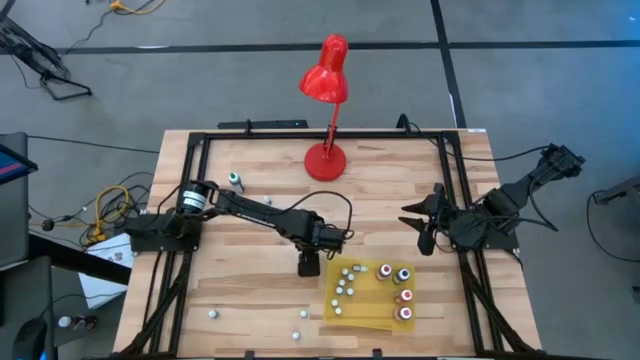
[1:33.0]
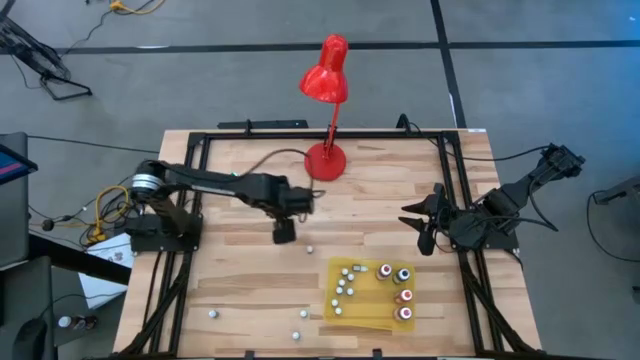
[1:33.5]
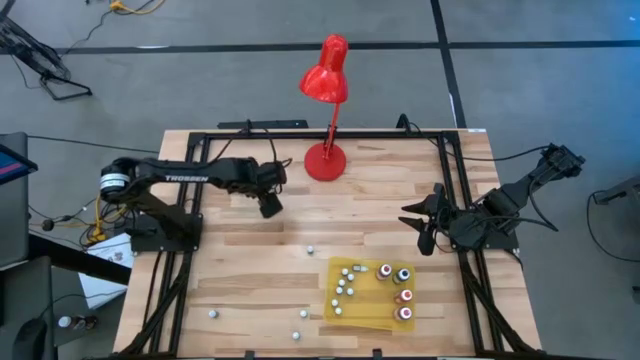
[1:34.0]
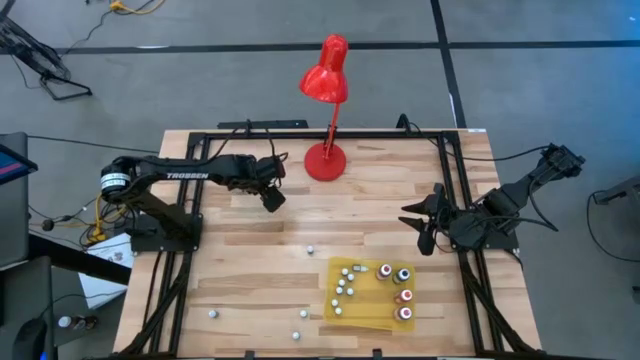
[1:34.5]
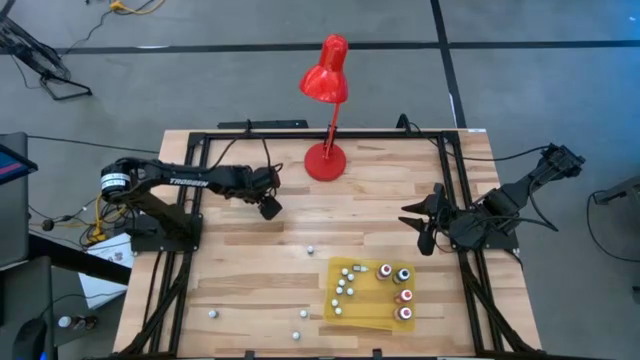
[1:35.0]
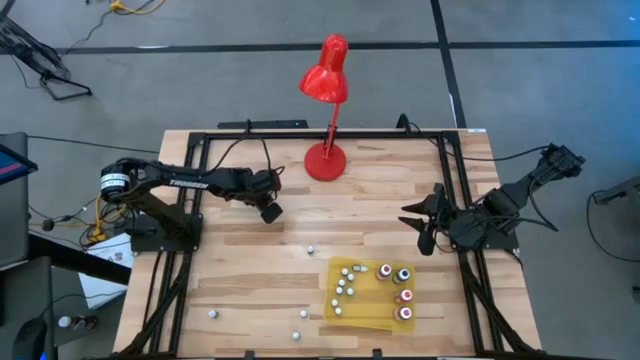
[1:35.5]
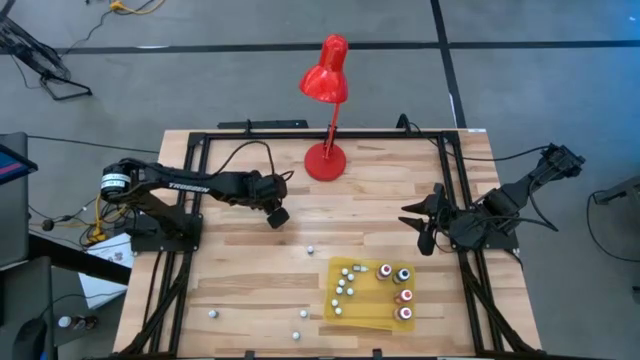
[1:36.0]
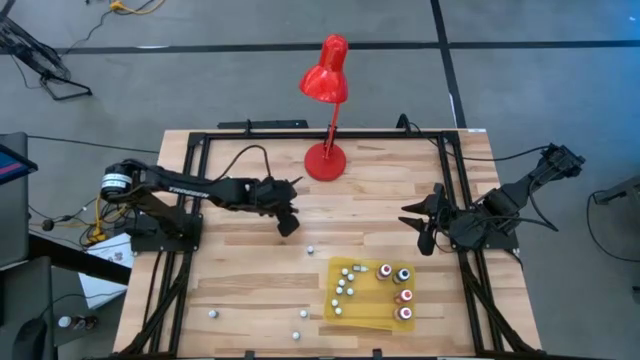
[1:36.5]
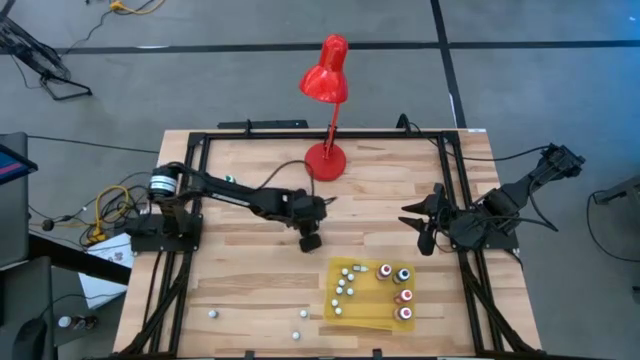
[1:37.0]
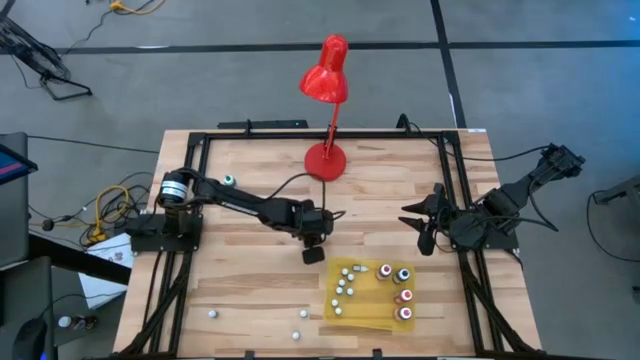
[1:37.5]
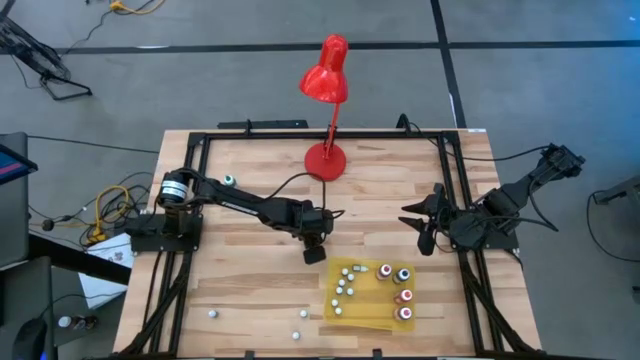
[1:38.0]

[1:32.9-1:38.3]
Task: Pick & Place food coloring
Move the blue food coloring to the center of the table

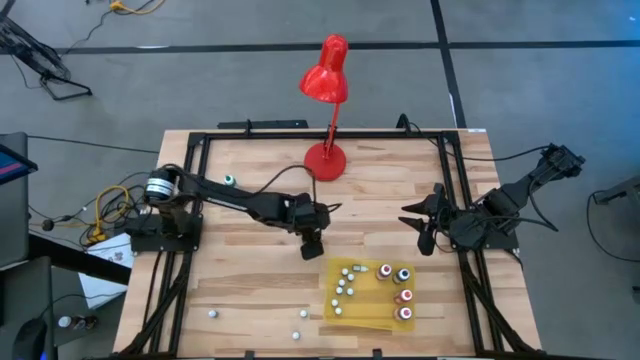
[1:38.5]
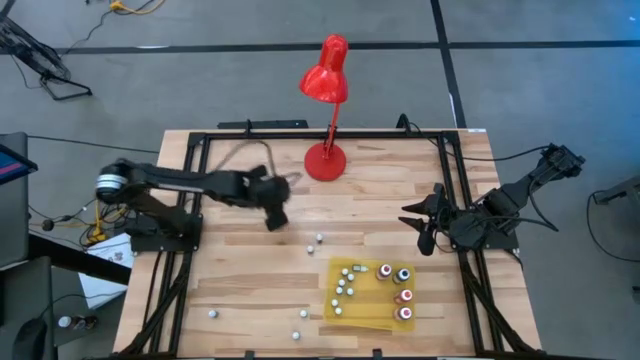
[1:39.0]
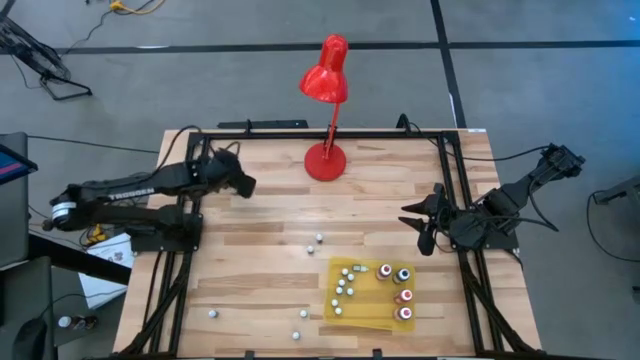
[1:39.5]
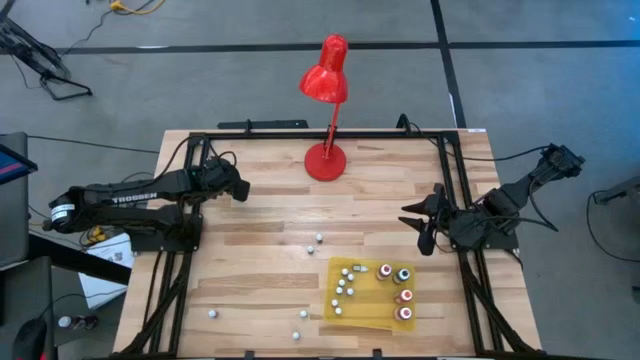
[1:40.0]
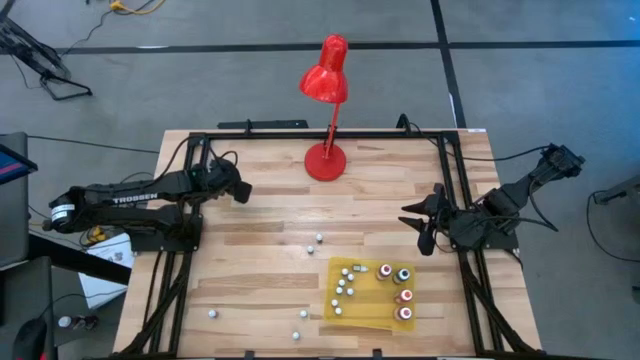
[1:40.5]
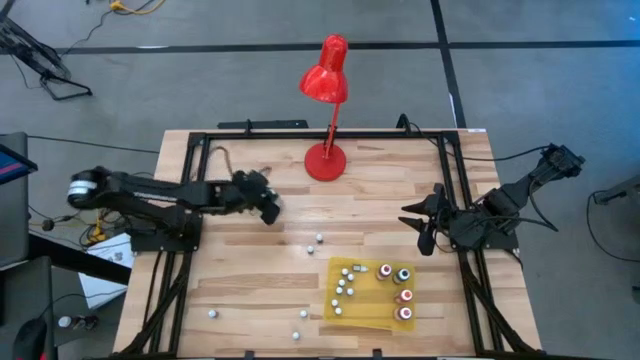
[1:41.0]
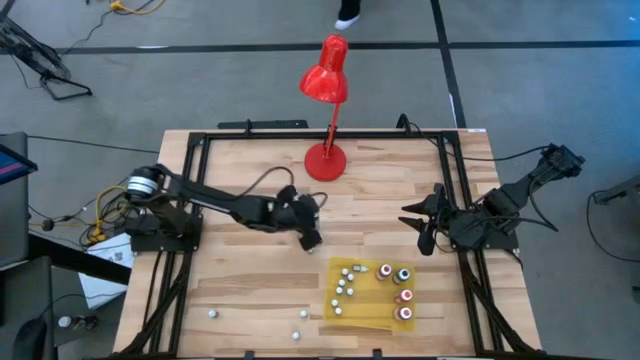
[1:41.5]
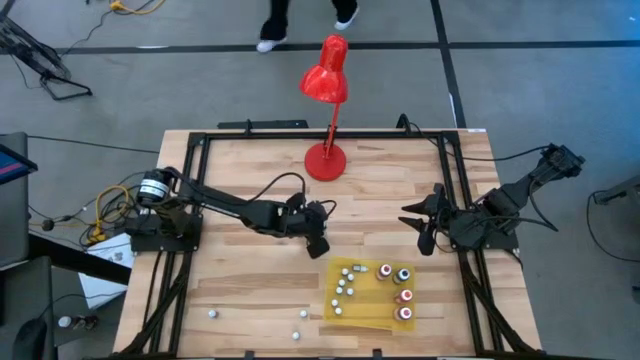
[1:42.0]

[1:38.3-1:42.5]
Move the large green food coloring to the center of the table

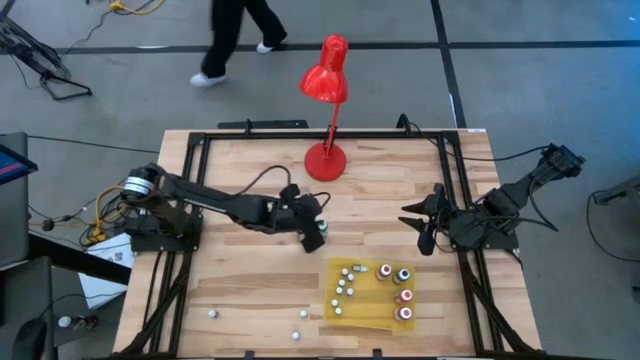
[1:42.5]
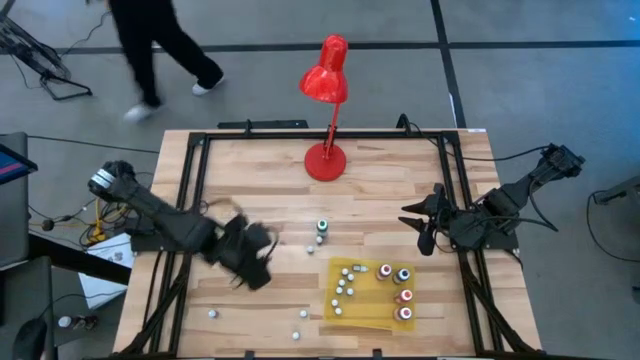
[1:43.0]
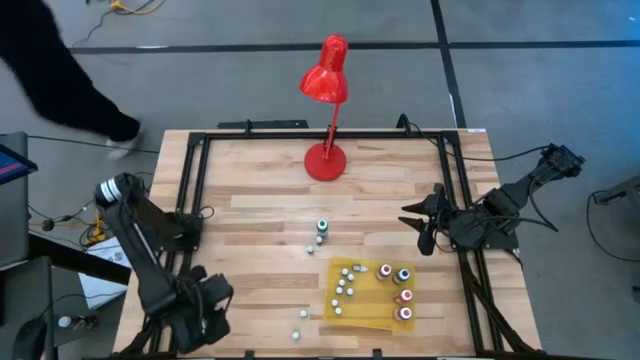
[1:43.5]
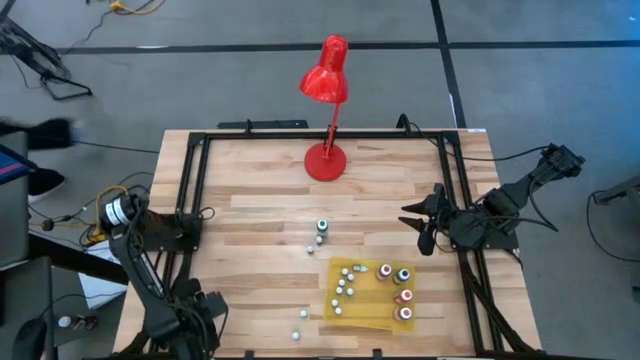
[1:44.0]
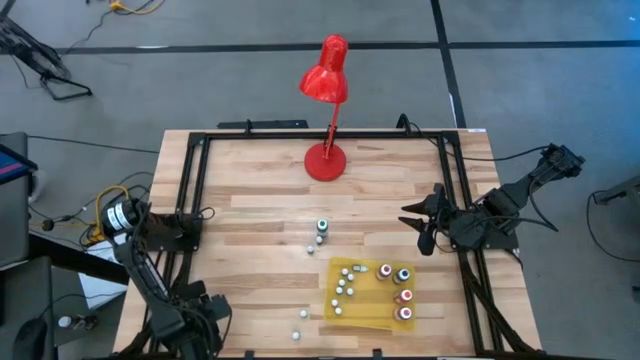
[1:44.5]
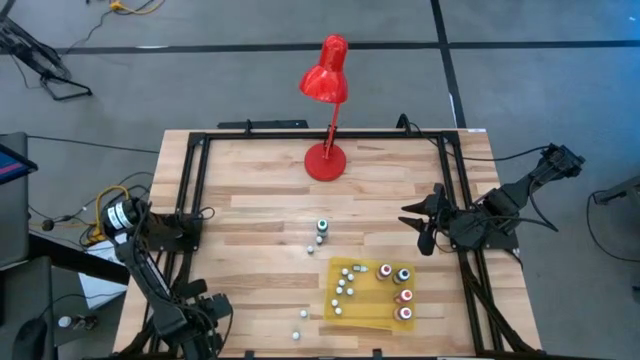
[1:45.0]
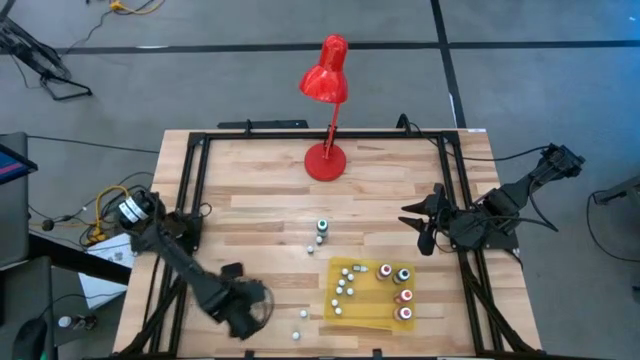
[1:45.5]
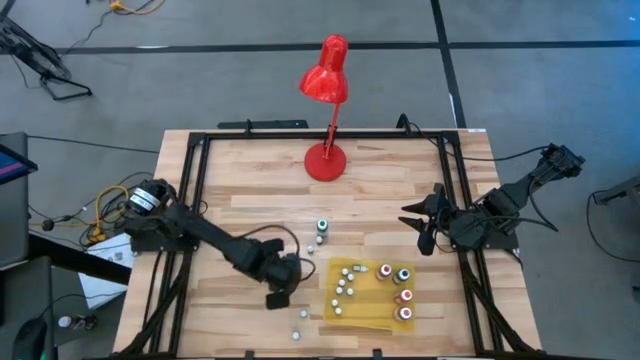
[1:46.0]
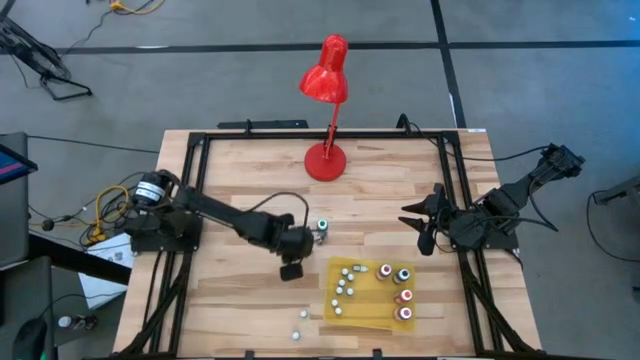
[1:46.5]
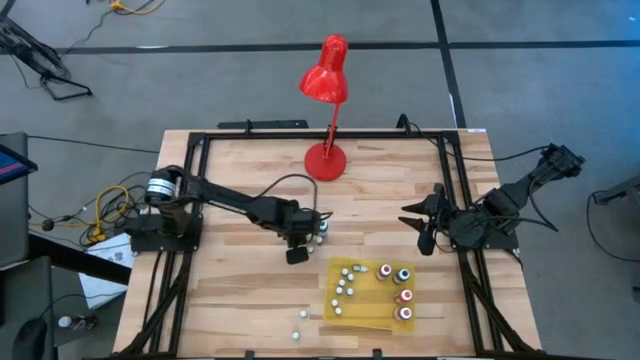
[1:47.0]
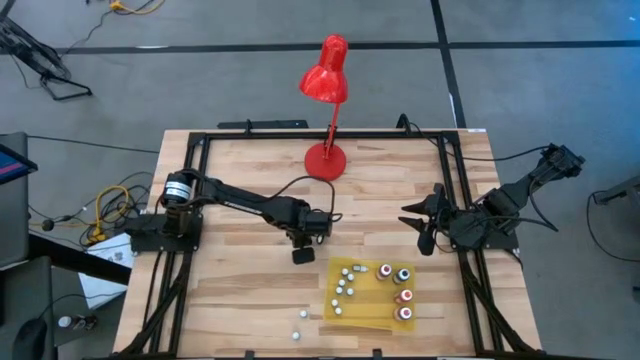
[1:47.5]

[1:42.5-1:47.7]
Move the green food coloring to the center of the table

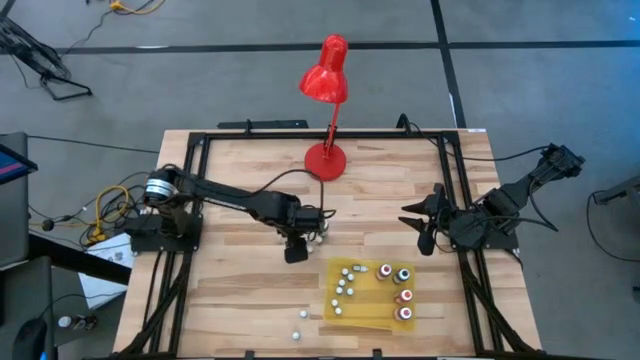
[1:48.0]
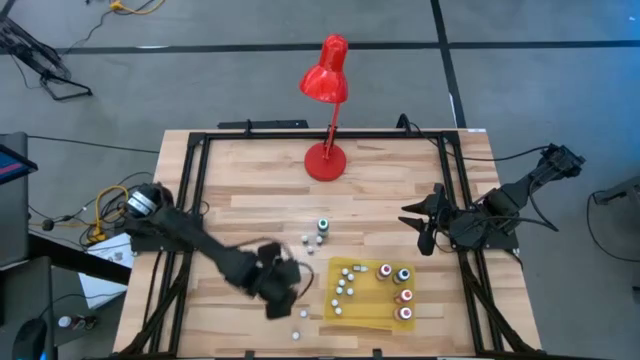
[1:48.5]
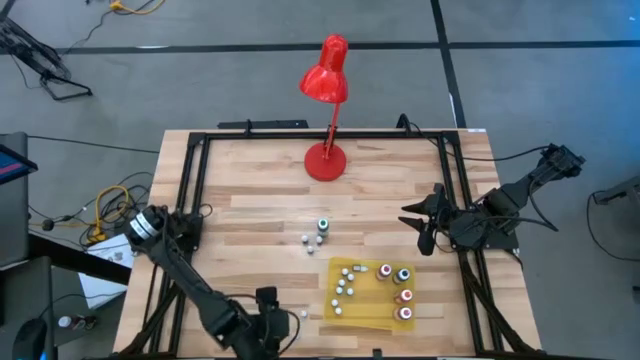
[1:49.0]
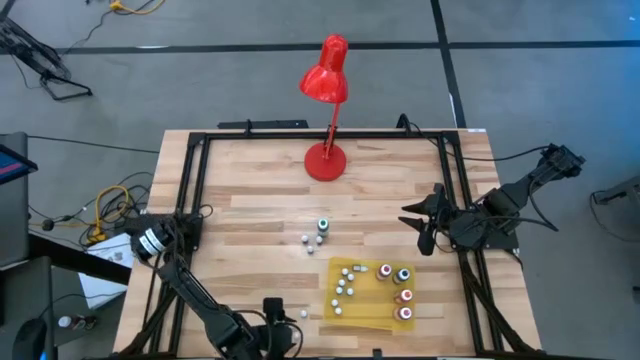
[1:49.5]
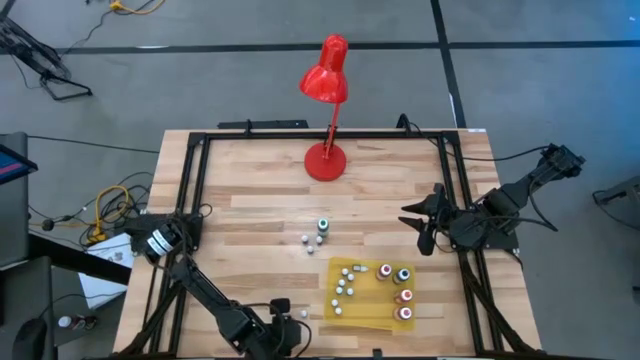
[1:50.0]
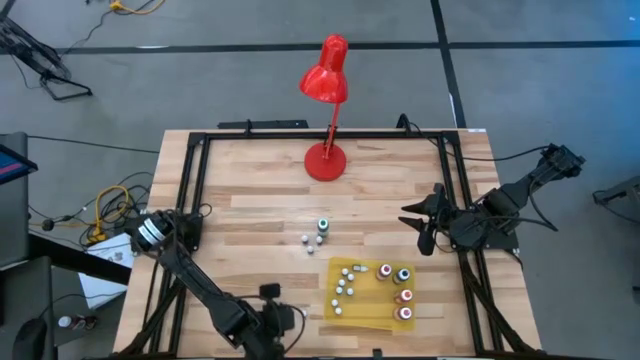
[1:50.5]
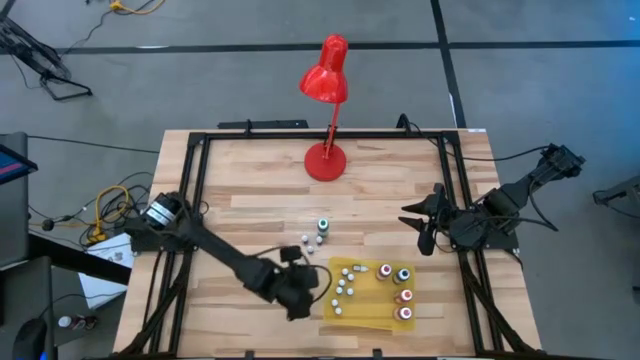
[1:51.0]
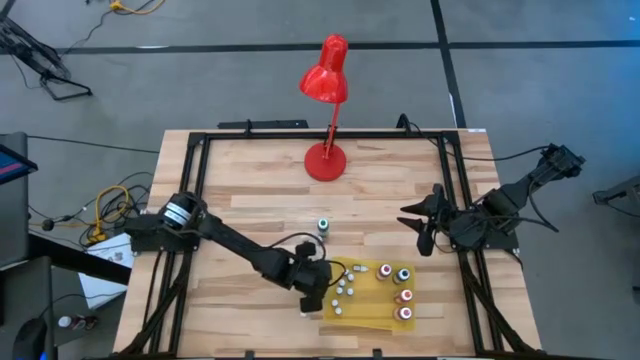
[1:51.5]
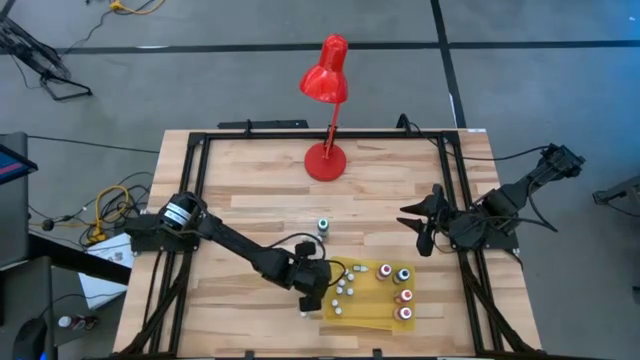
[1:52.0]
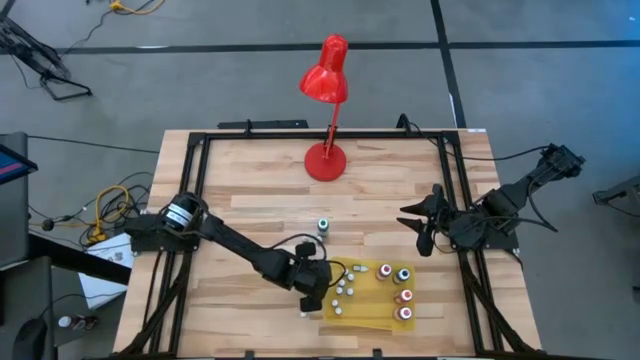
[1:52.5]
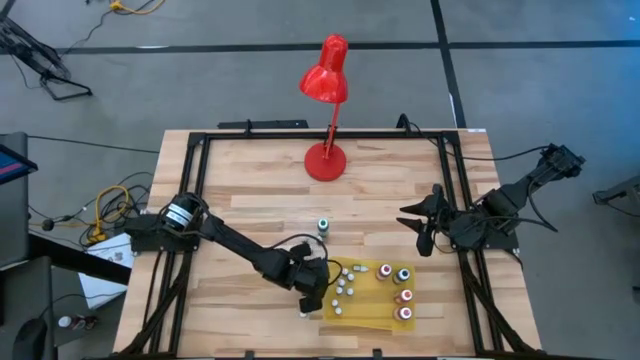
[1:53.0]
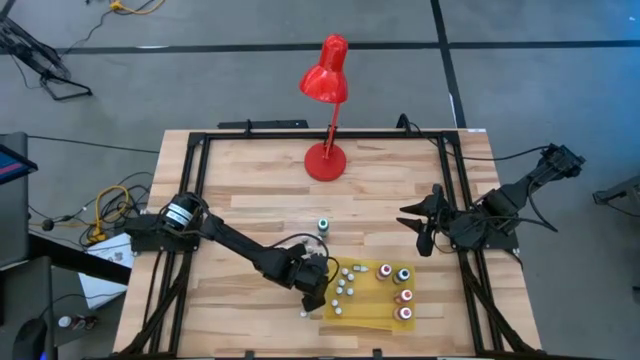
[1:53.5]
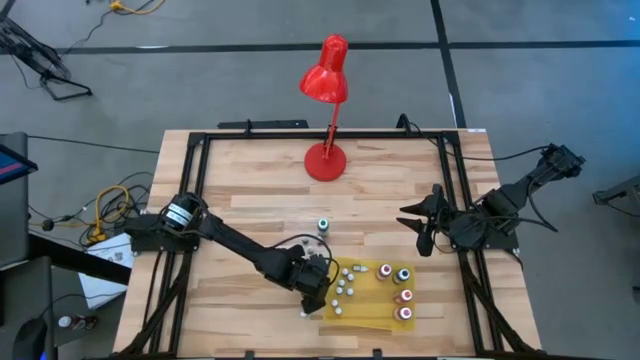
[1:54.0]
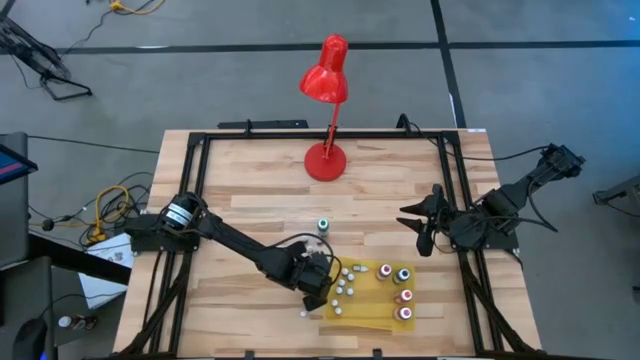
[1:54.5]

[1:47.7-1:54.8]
Move the red food coloring to the center of the table
